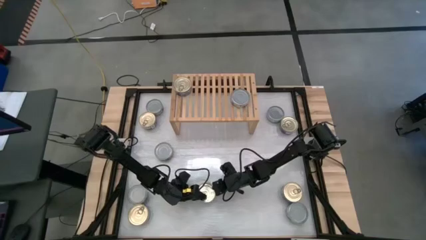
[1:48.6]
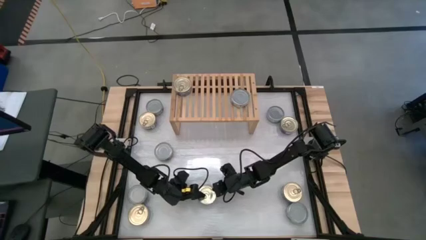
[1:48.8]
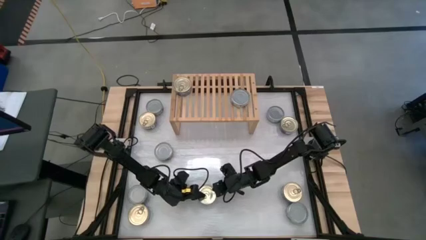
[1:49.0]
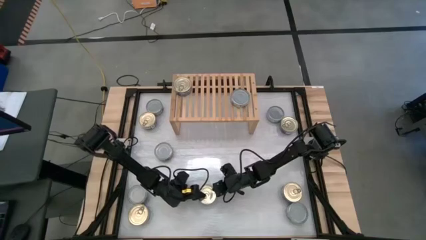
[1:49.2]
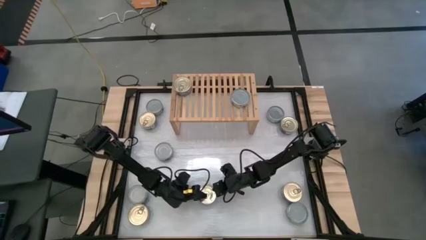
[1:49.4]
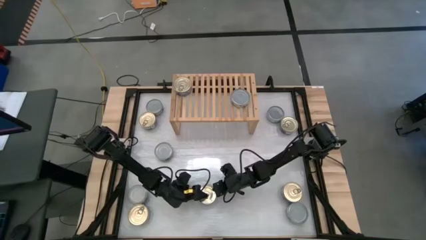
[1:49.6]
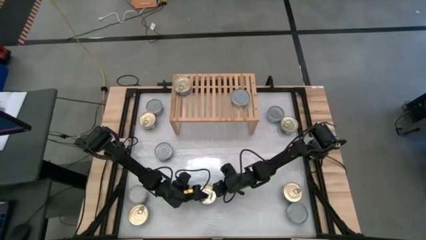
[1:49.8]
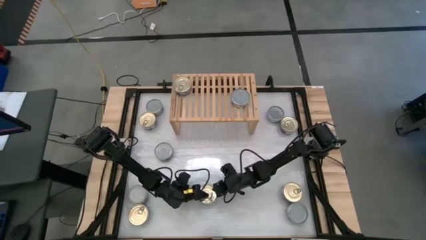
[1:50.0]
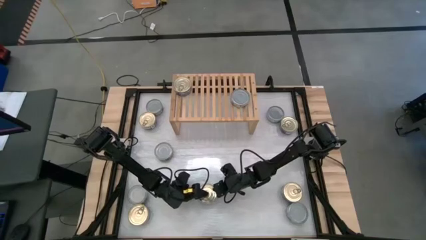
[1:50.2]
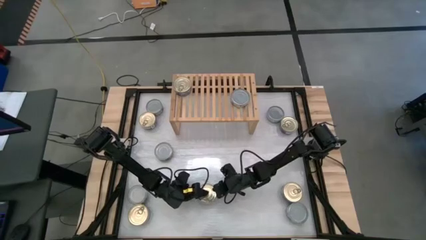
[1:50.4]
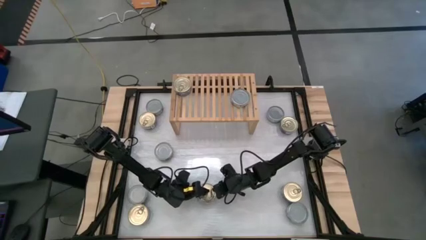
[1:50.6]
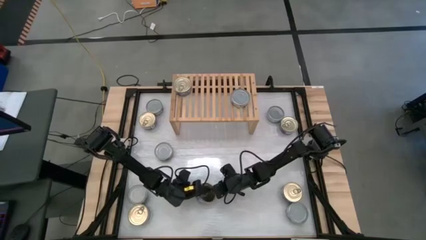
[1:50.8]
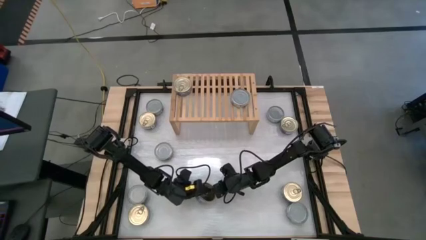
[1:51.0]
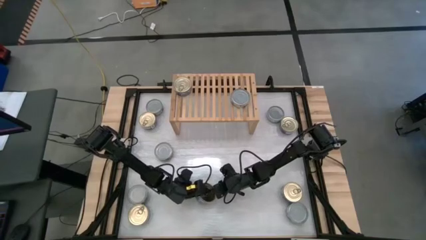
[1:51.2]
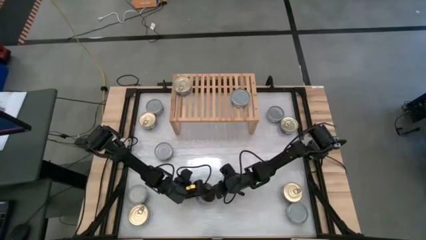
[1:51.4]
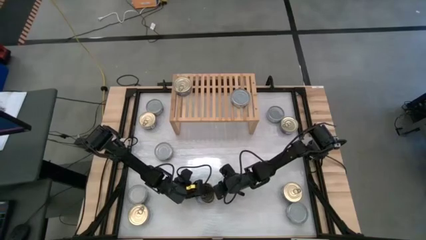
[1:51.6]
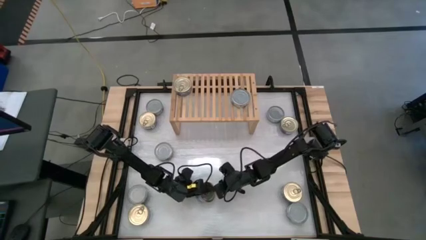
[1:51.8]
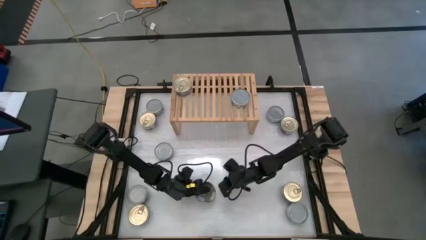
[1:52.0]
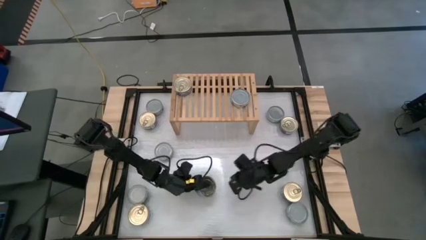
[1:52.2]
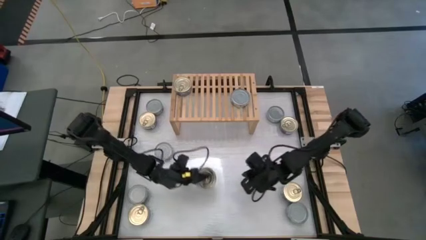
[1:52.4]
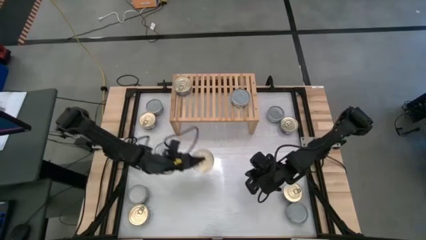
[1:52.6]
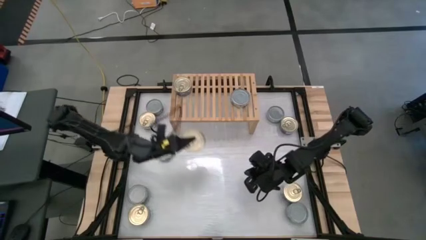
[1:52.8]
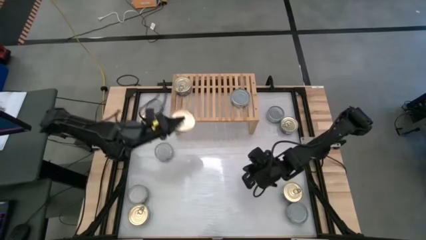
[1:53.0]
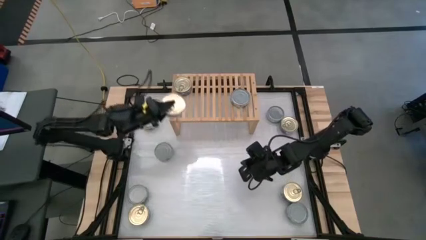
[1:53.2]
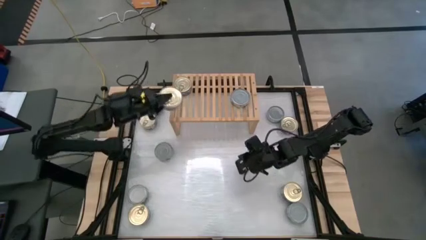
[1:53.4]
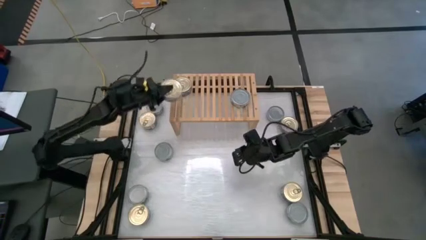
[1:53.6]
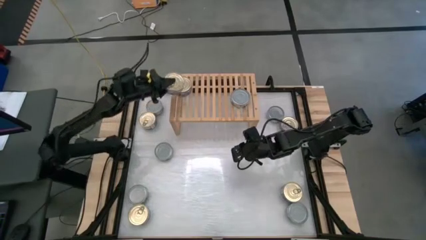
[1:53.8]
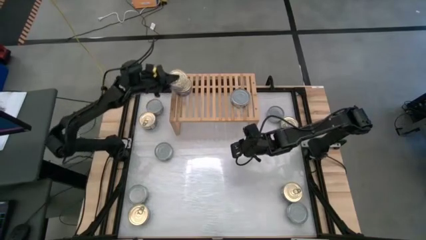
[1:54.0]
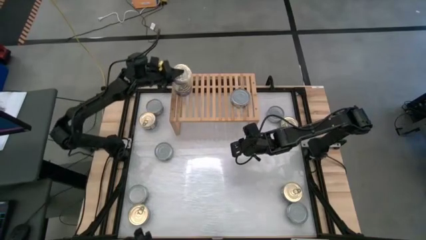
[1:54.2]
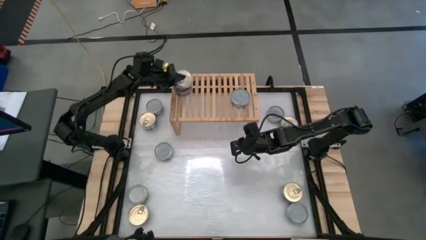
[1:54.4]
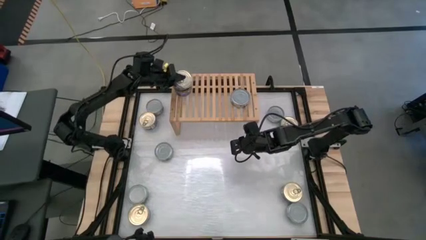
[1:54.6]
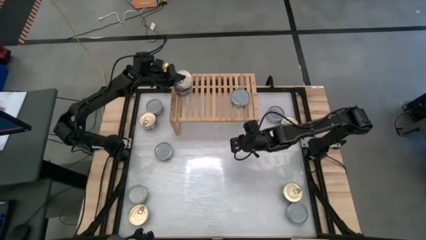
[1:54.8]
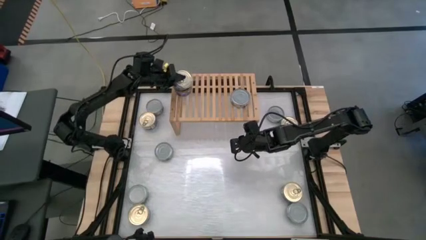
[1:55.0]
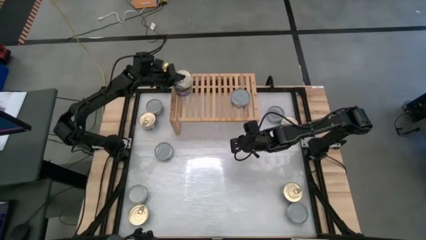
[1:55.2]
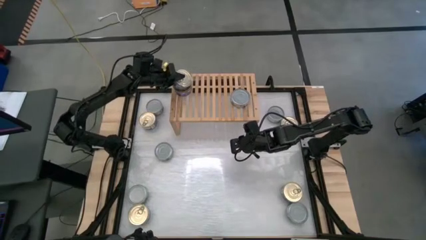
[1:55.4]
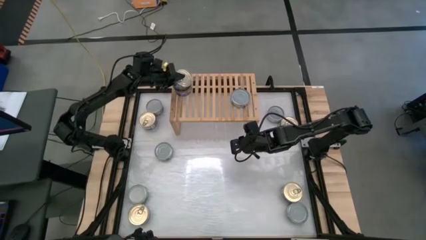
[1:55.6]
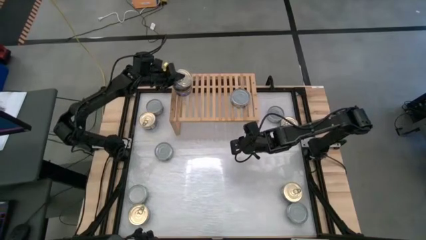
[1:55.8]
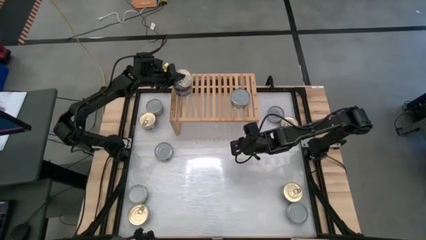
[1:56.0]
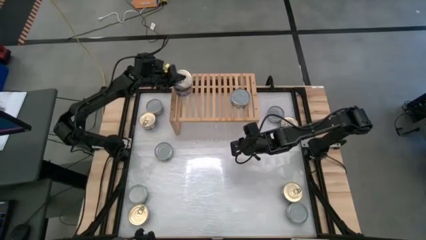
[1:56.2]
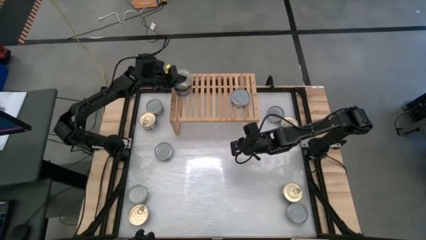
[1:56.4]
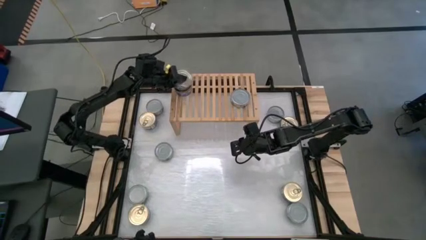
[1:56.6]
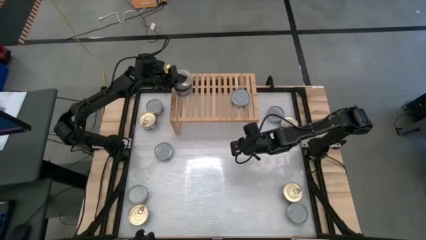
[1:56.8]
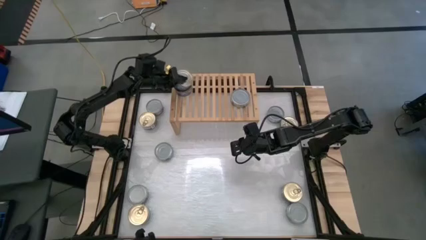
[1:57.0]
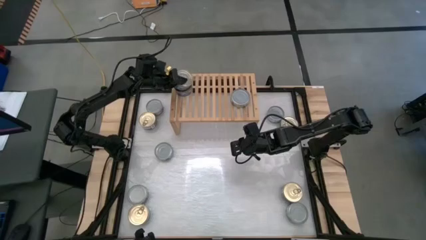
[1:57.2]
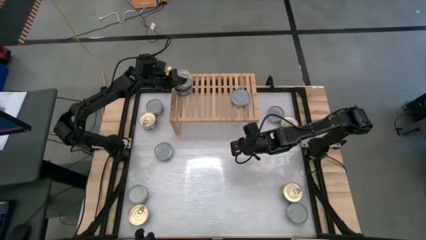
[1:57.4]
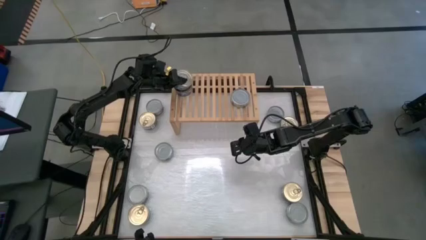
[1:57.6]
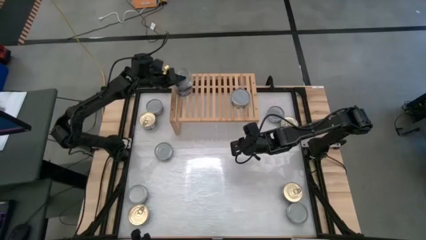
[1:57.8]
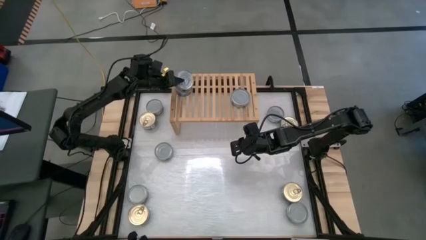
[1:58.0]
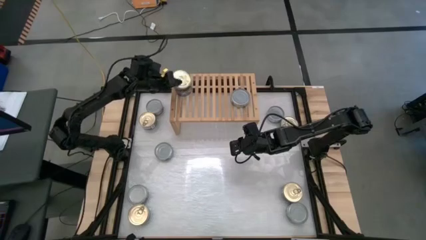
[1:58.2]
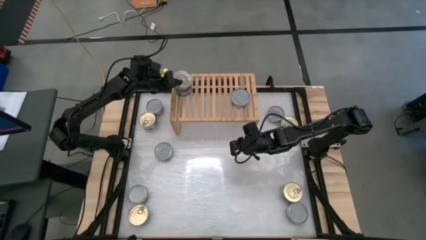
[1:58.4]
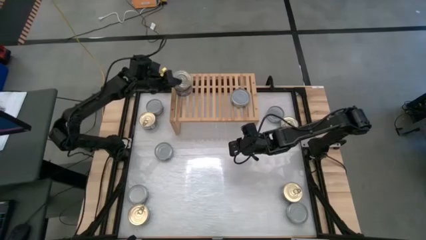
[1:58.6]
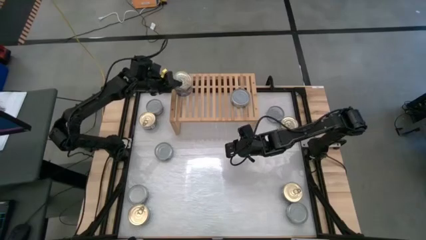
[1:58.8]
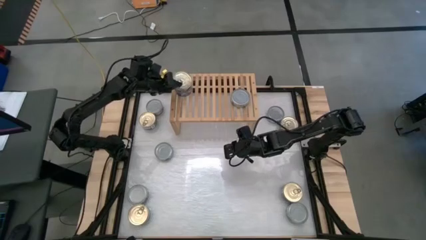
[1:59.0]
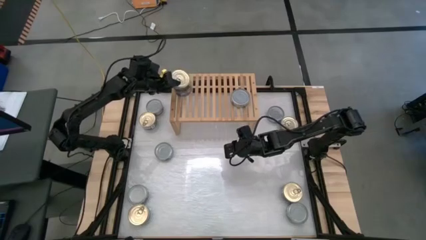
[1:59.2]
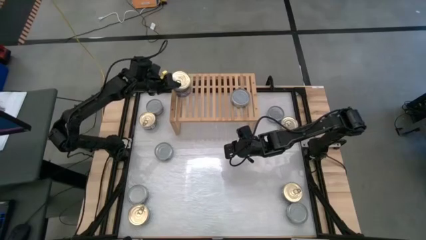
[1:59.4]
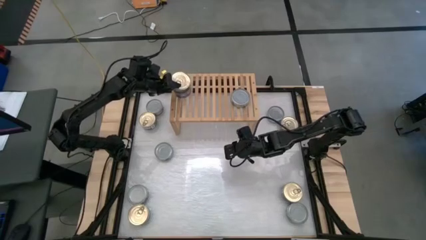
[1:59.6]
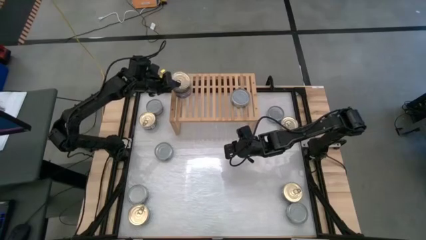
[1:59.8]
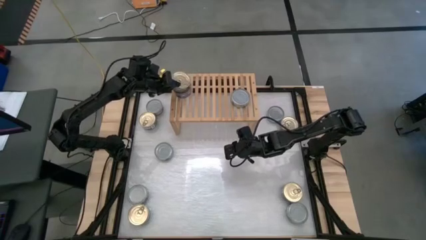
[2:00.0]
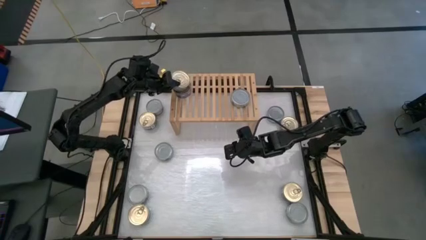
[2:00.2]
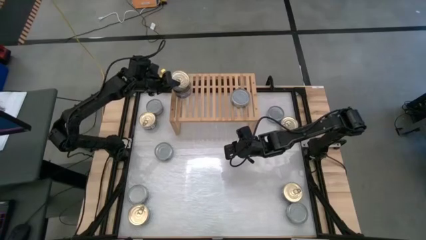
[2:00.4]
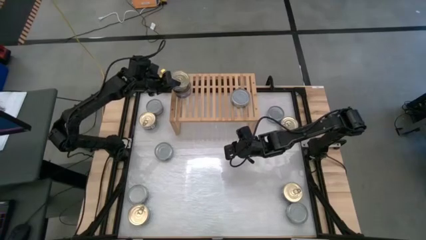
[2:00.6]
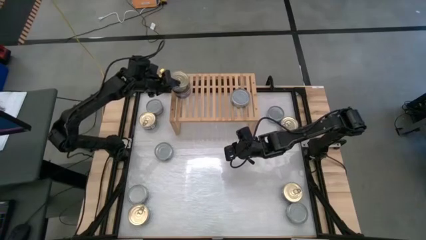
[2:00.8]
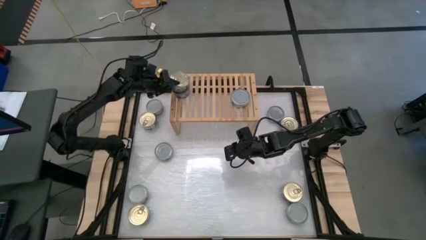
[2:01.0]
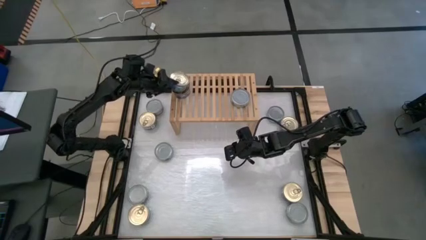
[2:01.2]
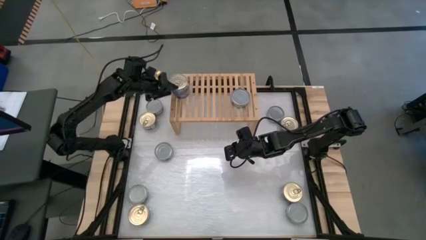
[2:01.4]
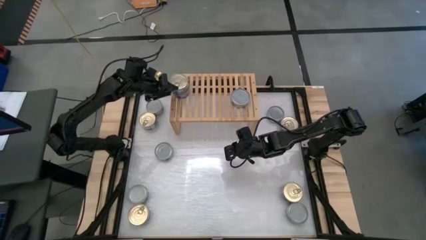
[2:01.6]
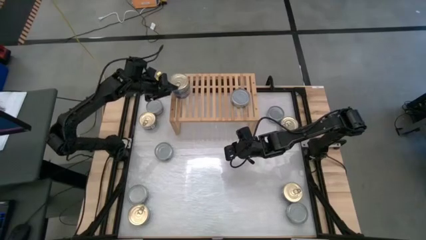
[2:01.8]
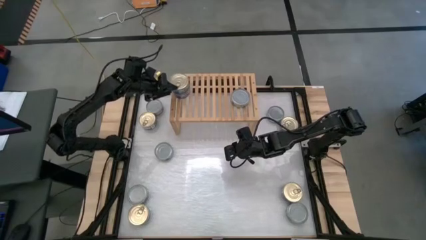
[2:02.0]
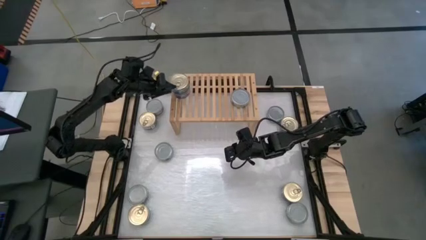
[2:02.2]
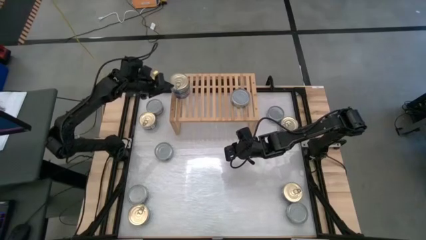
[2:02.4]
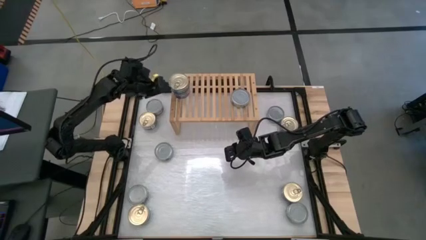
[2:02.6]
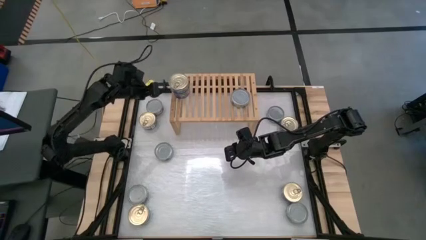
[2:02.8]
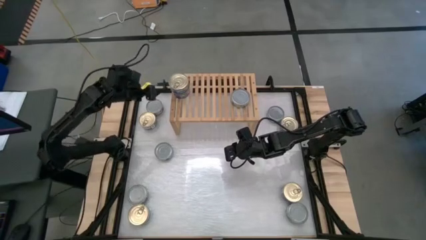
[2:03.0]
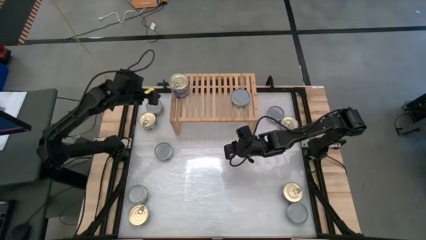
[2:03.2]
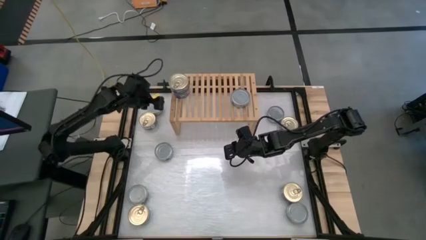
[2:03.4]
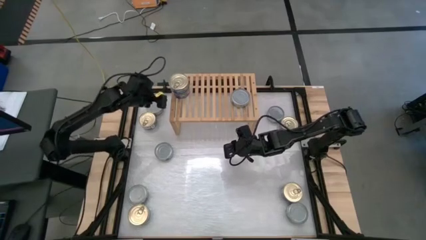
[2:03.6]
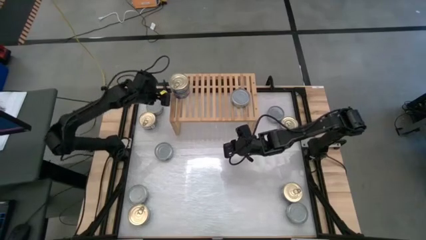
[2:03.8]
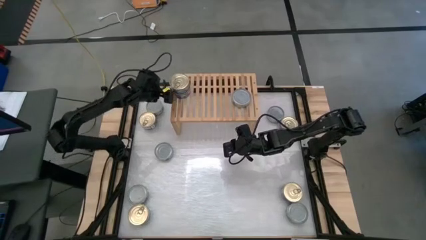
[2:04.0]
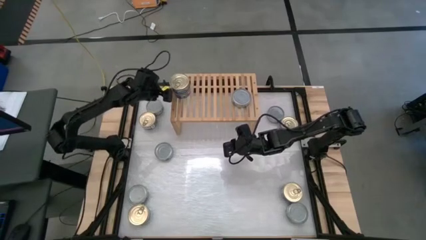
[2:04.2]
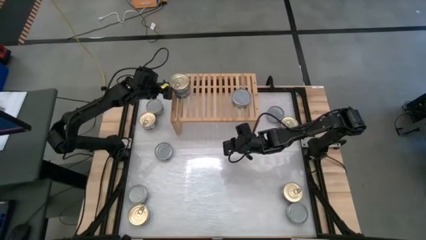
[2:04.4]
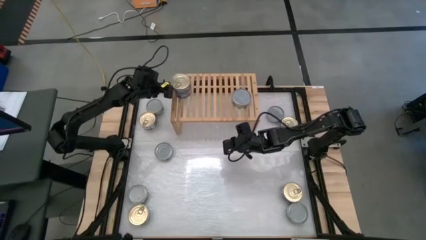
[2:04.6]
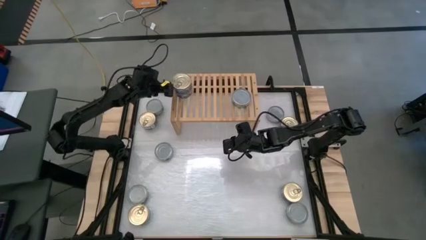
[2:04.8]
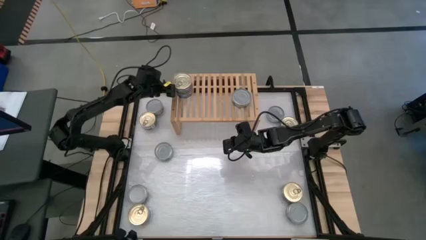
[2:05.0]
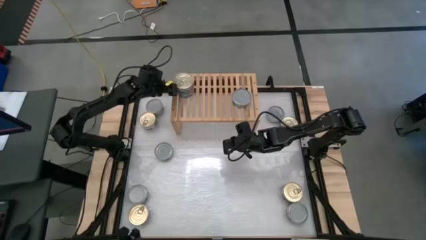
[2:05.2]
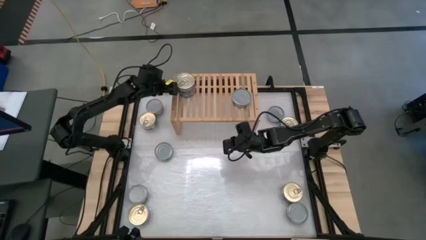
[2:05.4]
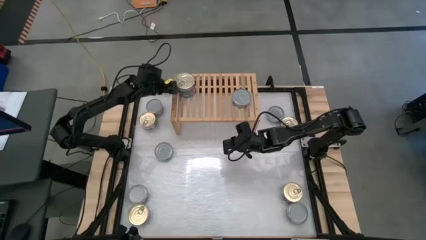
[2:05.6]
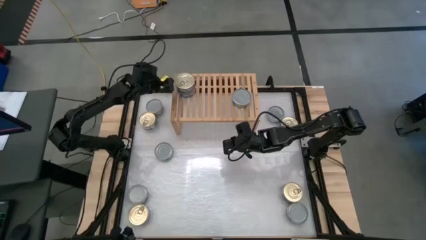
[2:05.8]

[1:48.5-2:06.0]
Task: Stack canned seafood by type on shelf
Stack the blue-pink tuna can on top of the other blue-pink tuna can on the shelf
